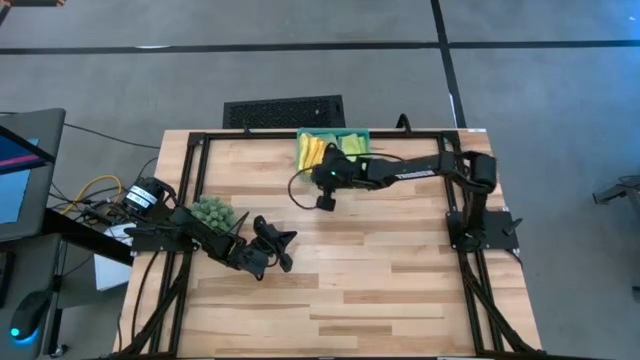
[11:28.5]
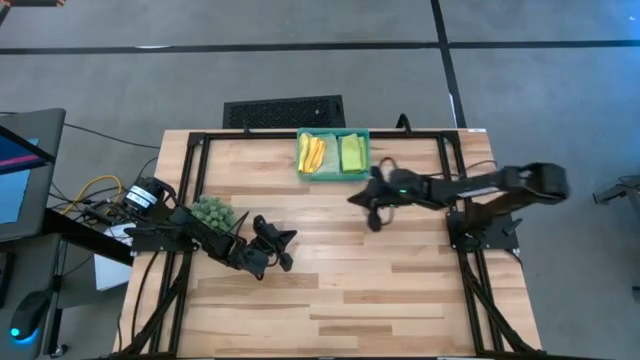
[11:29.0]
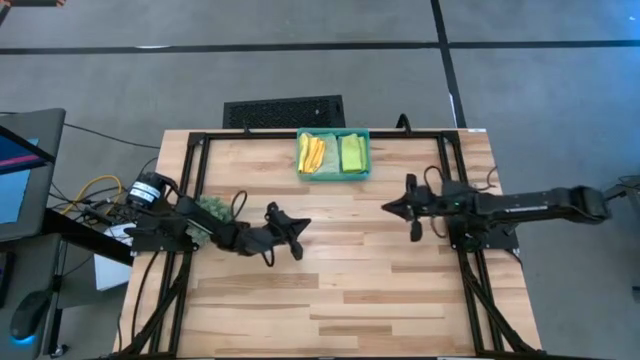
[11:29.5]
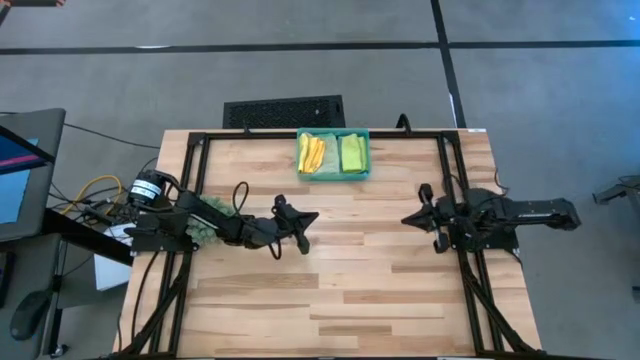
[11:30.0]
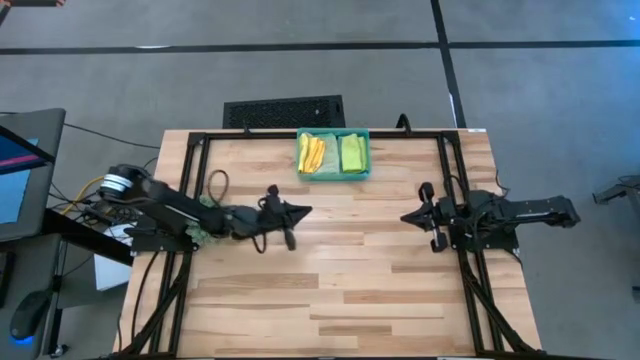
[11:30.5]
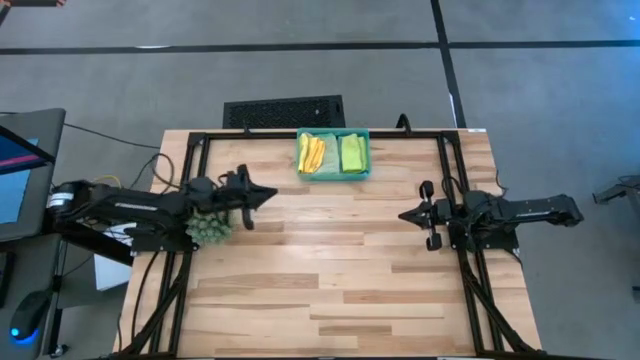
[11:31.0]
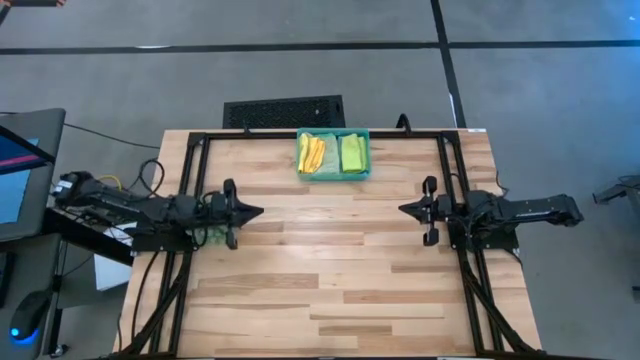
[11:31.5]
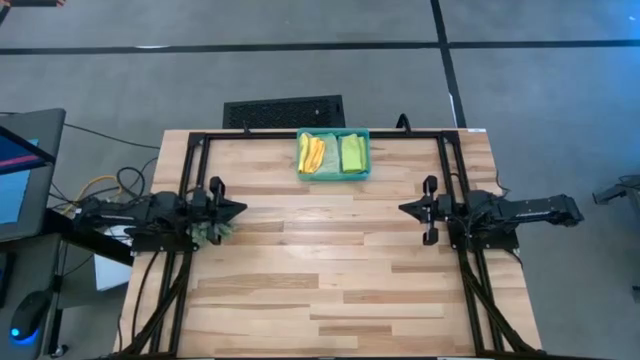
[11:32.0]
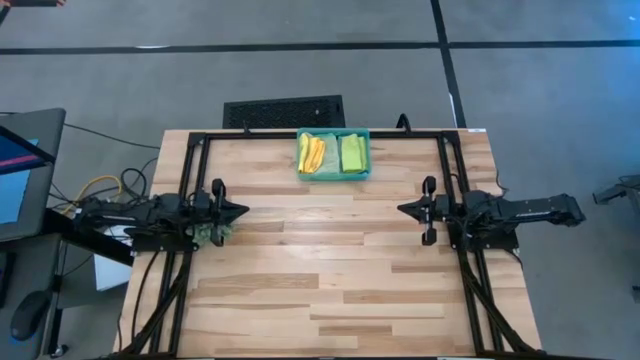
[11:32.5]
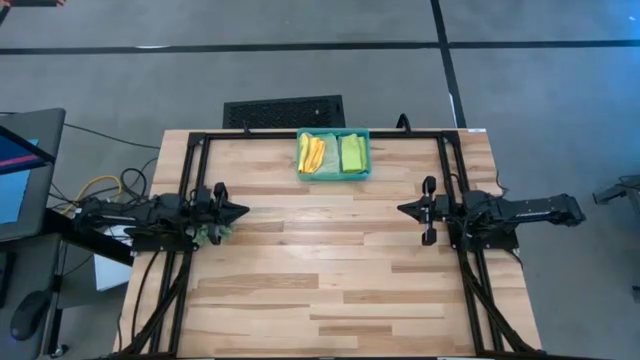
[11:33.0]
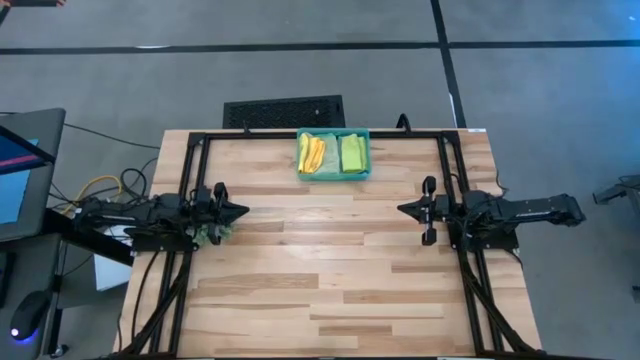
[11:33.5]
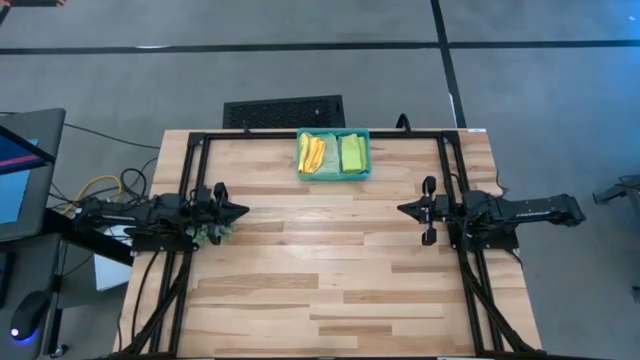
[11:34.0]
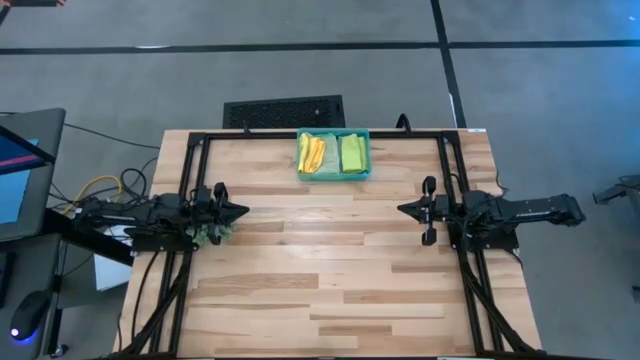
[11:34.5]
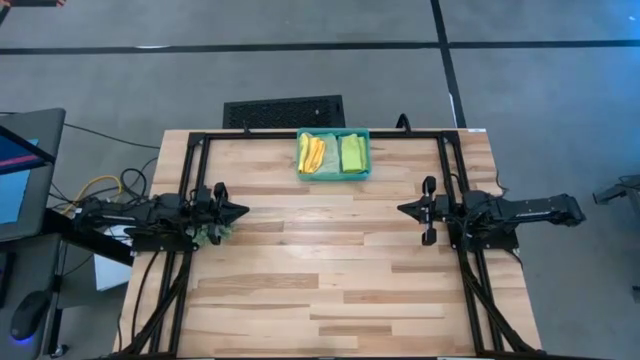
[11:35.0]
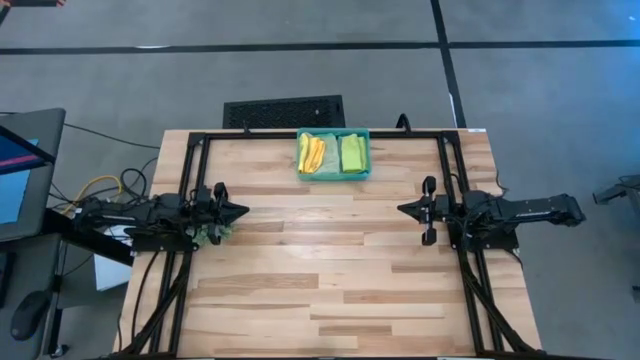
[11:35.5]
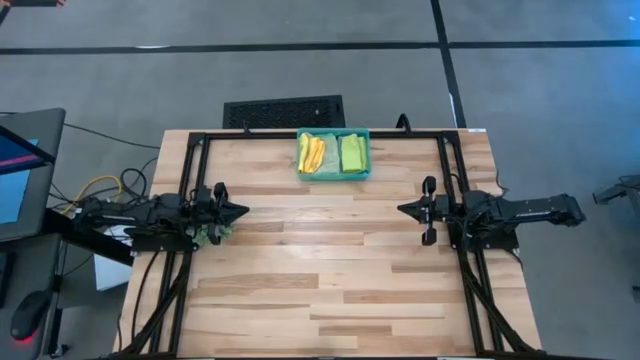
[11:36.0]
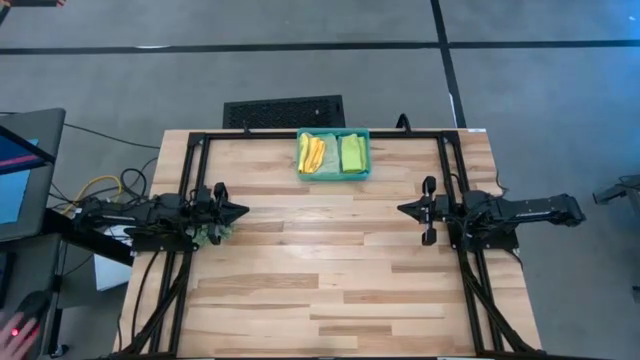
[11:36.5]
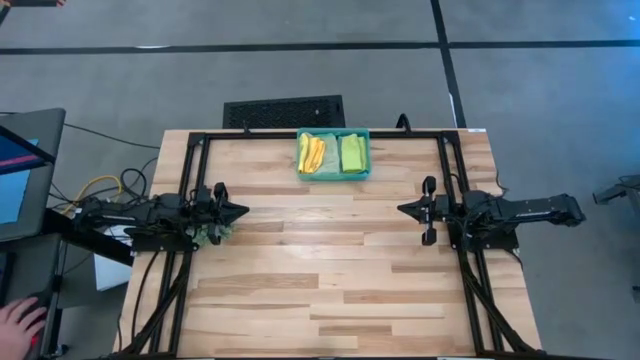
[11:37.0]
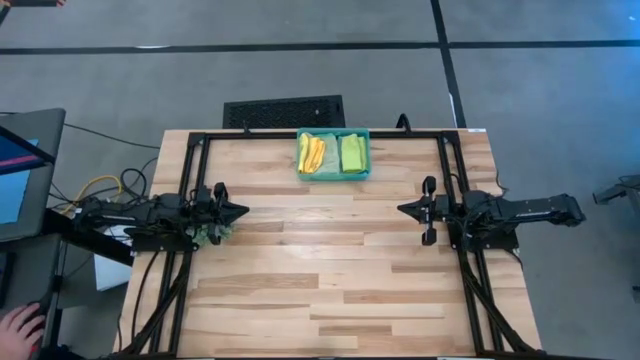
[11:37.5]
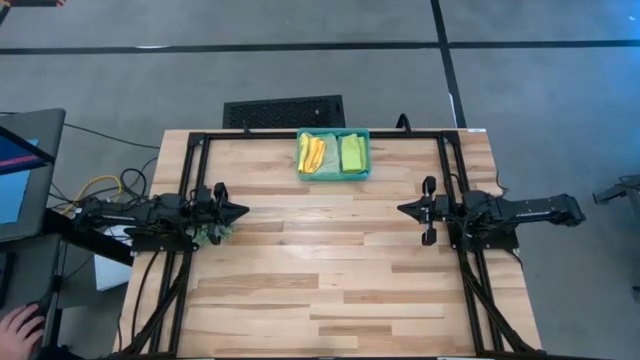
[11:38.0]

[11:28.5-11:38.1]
Task: Fold microfiber towels
Return to Home Position

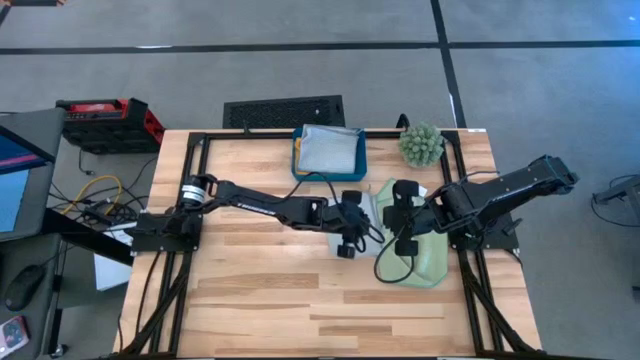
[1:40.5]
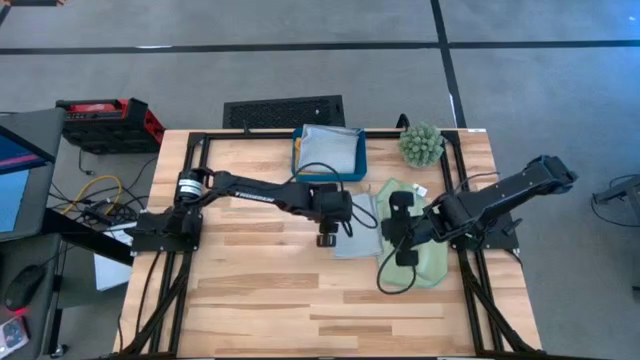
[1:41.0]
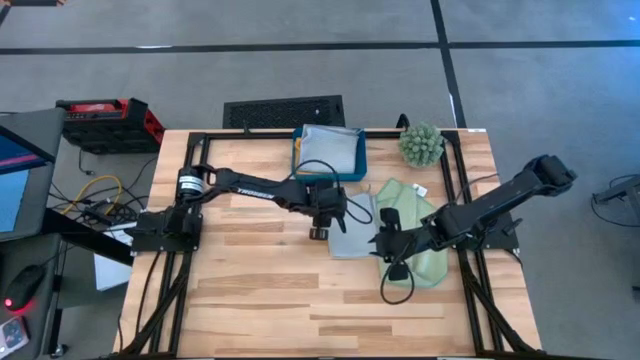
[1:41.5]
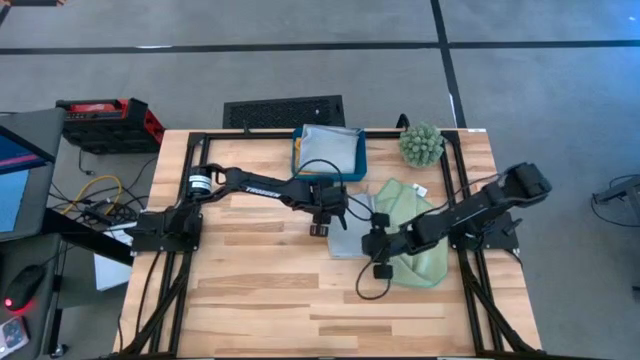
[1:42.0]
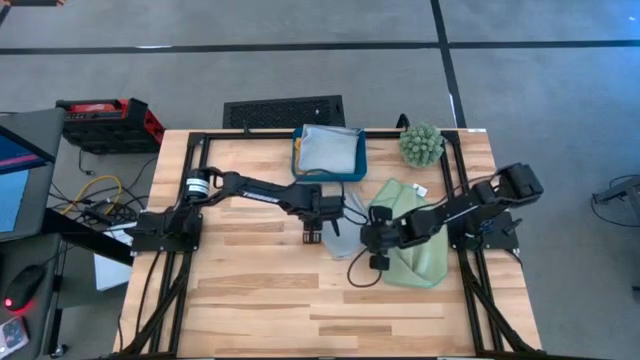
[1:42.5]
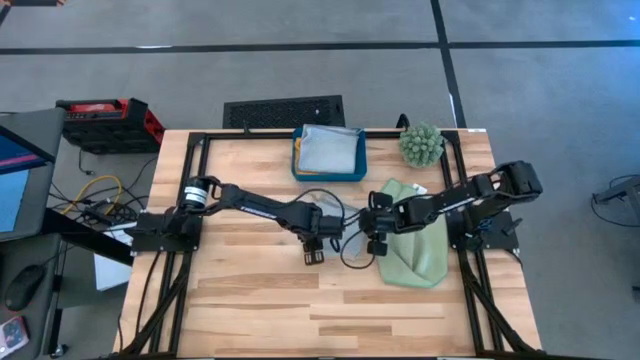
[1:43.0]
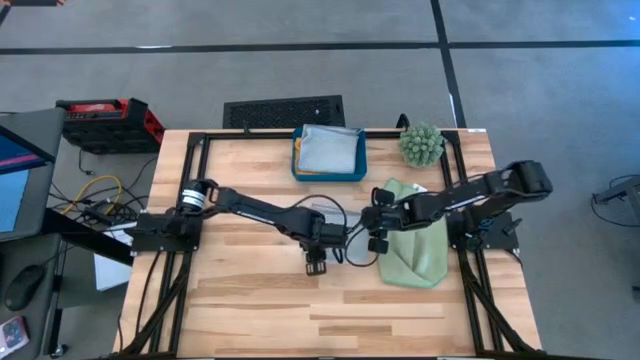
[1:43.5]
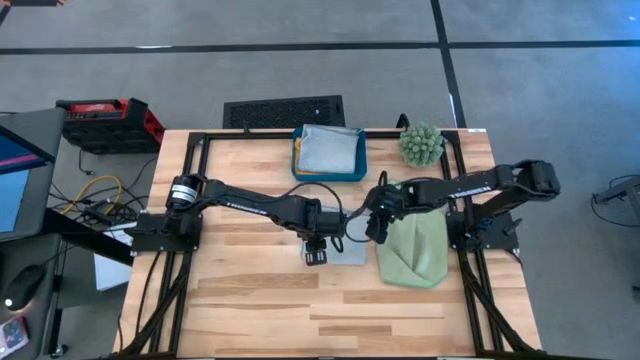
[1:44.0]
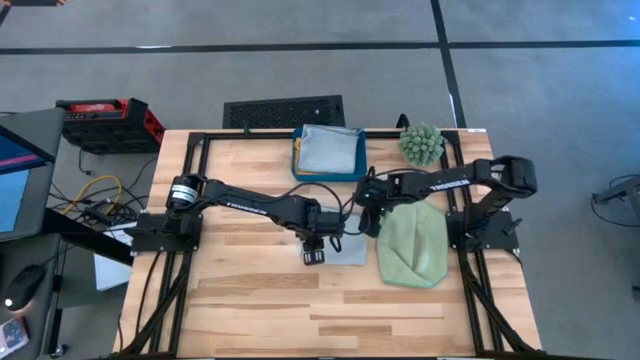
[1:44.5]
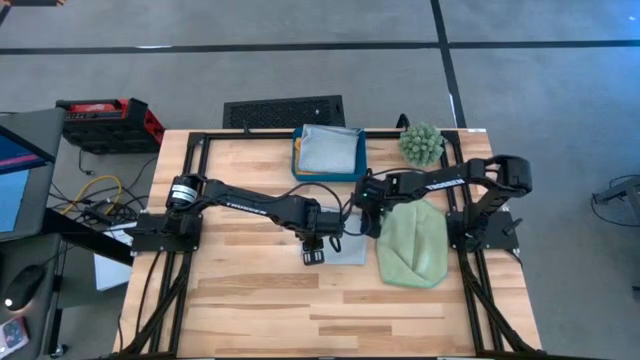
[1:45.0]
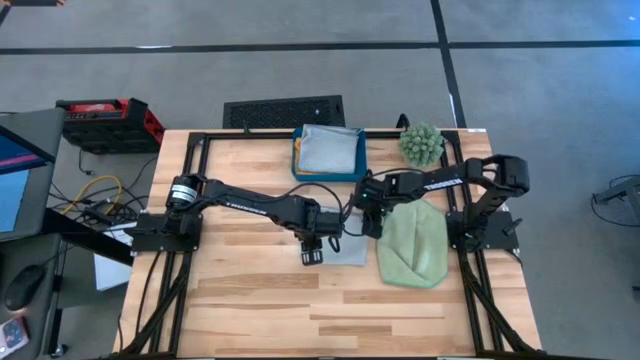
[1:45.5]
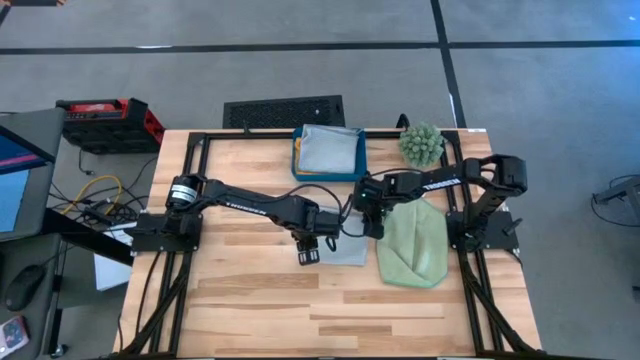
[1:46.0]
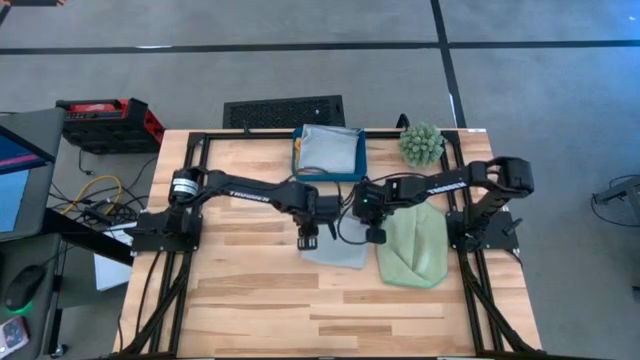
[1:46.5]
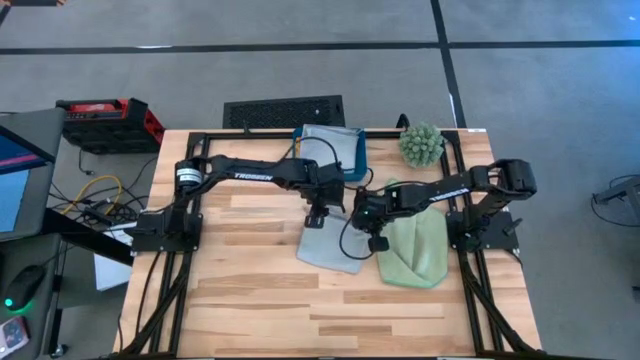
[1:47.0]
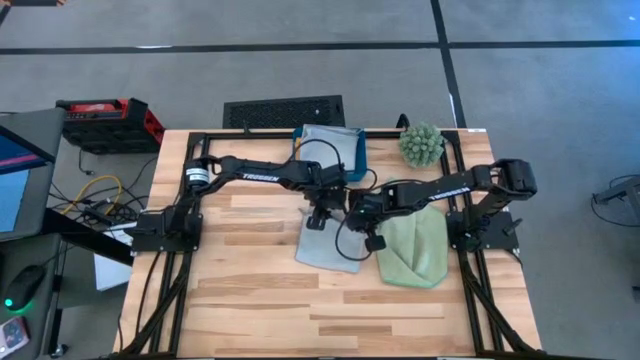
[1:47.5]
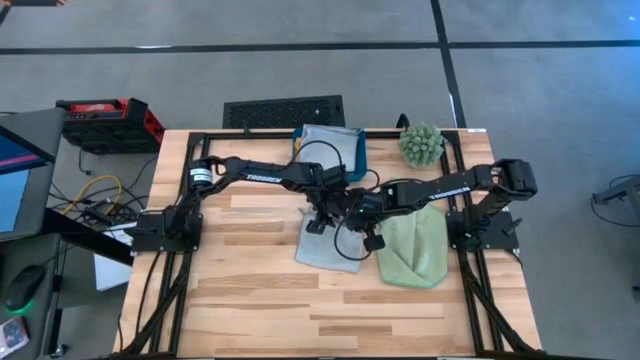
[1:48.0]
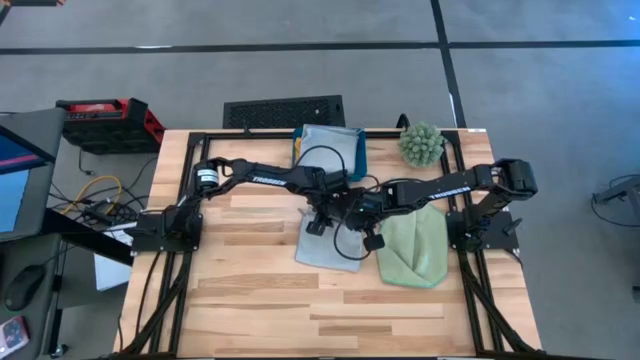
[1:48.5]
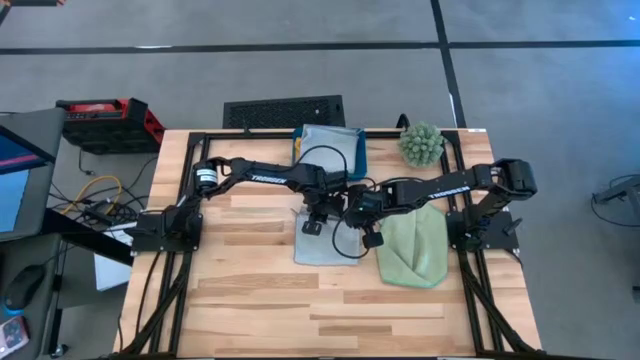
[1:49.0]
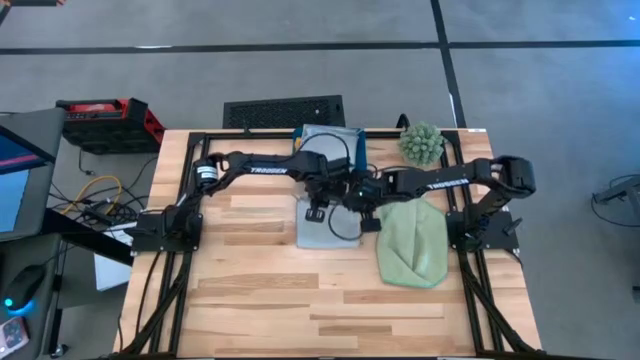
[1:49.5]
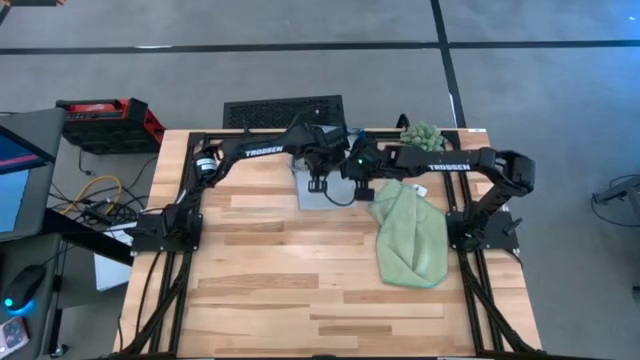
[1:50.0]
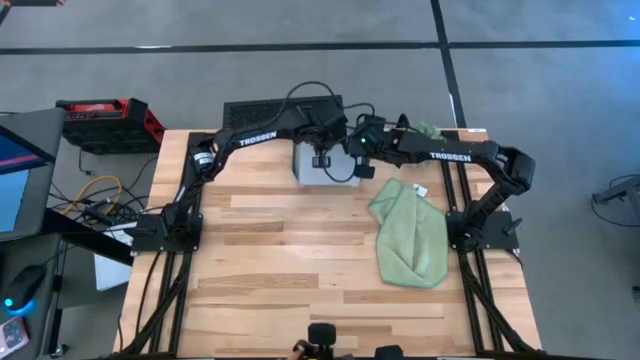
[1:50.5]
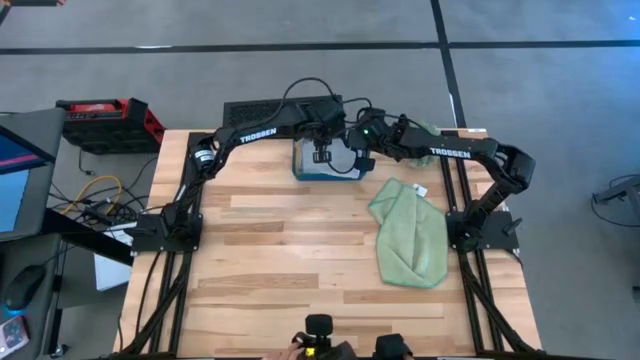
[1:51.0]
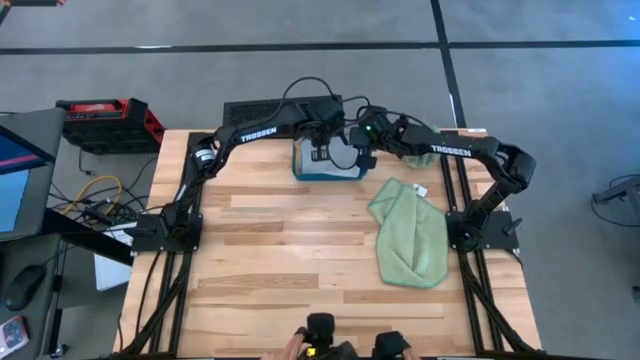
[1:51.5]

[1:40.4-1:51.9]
Task: Fold microfiber towels
Put the gray microfiber cloth in the blue bin
